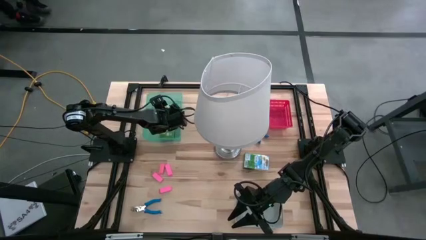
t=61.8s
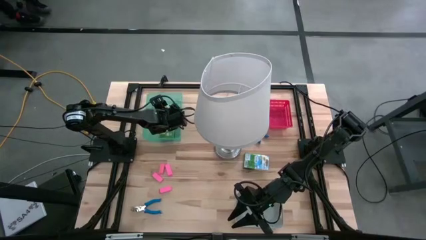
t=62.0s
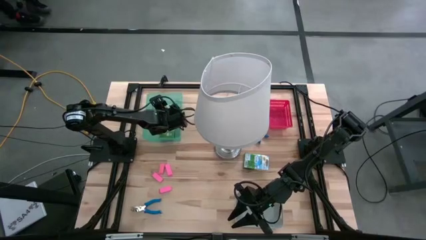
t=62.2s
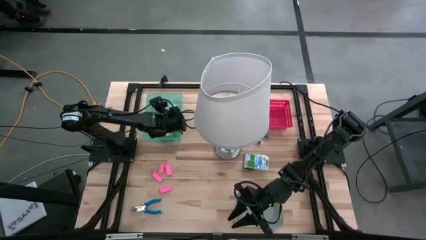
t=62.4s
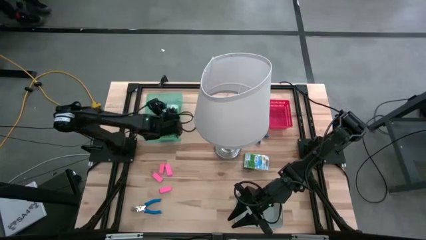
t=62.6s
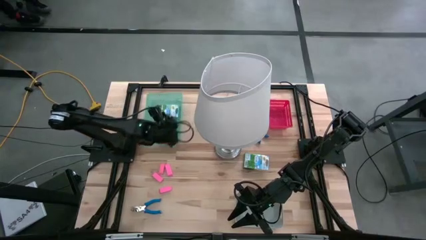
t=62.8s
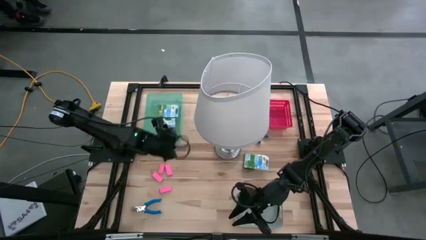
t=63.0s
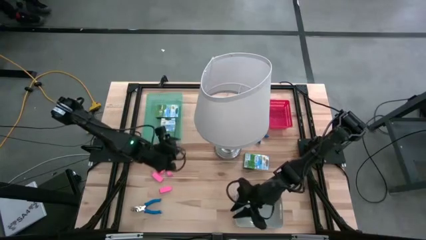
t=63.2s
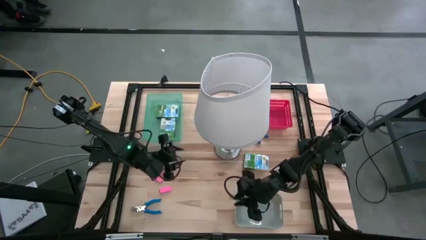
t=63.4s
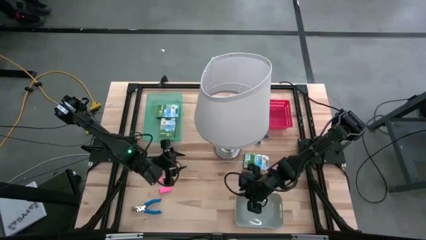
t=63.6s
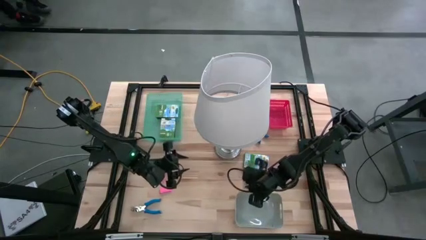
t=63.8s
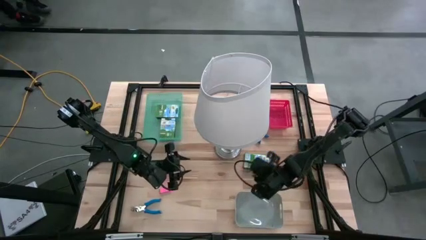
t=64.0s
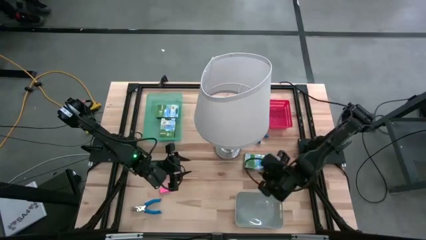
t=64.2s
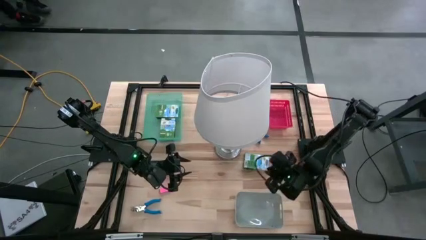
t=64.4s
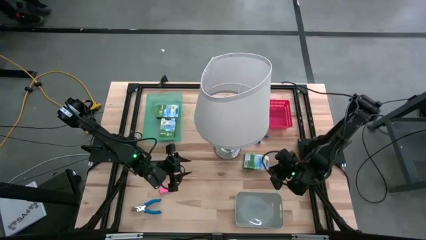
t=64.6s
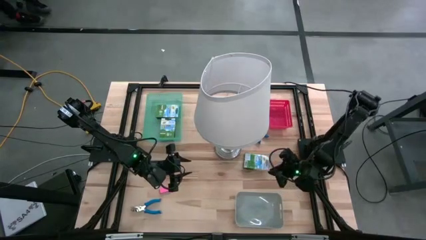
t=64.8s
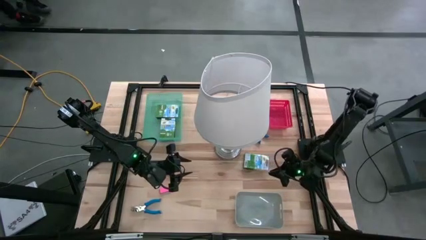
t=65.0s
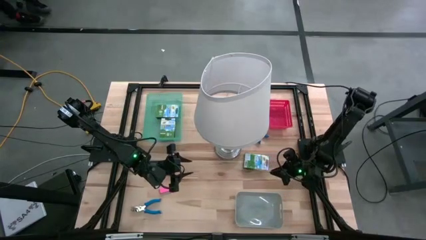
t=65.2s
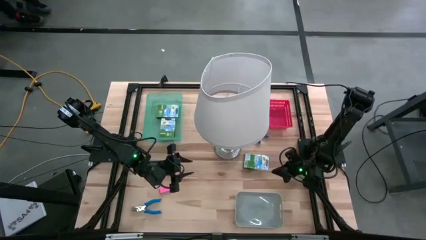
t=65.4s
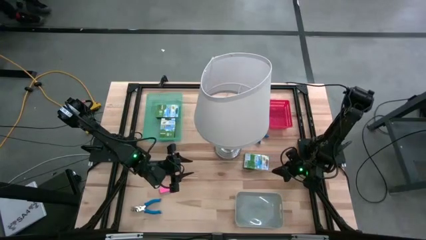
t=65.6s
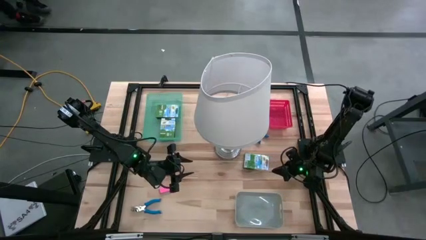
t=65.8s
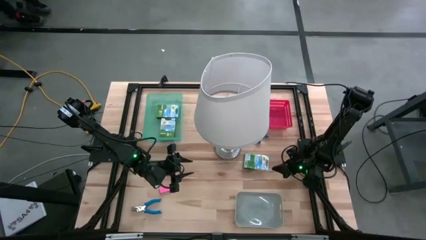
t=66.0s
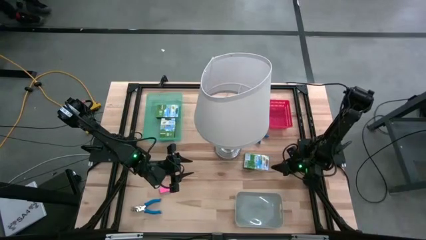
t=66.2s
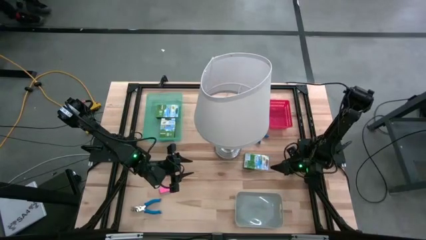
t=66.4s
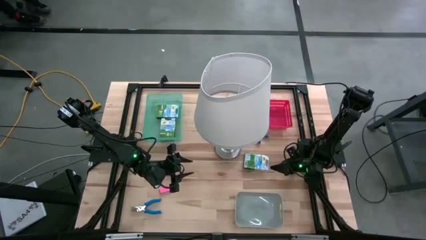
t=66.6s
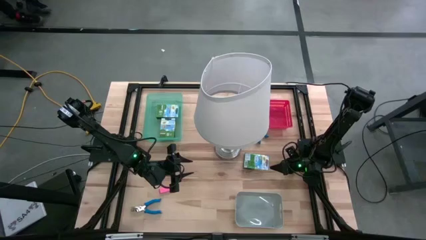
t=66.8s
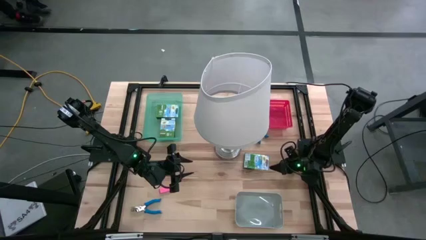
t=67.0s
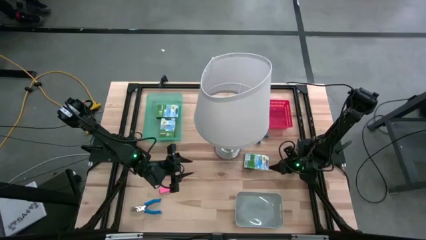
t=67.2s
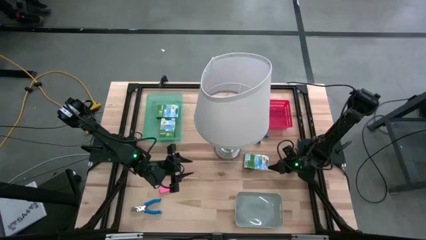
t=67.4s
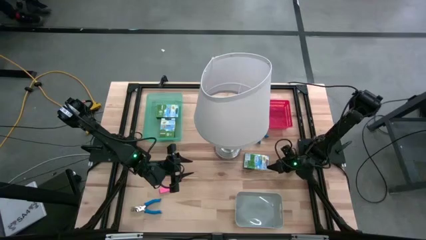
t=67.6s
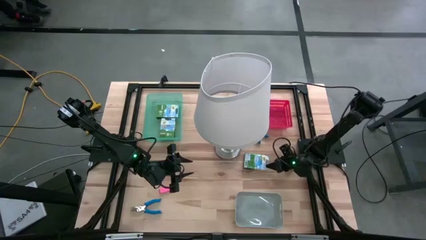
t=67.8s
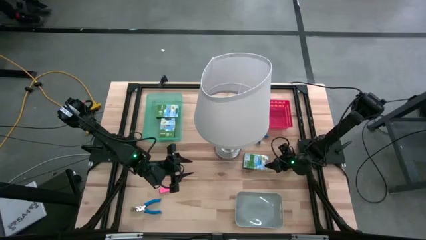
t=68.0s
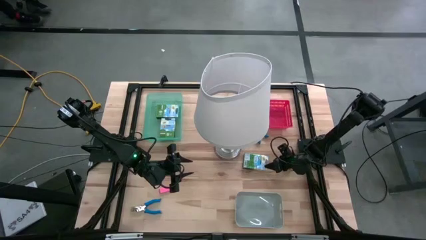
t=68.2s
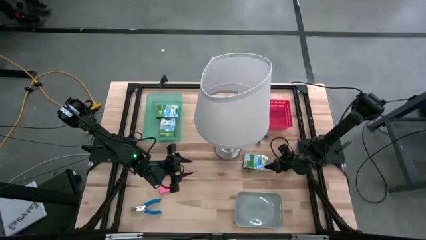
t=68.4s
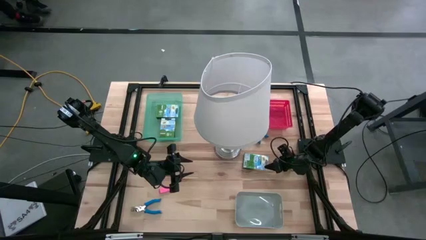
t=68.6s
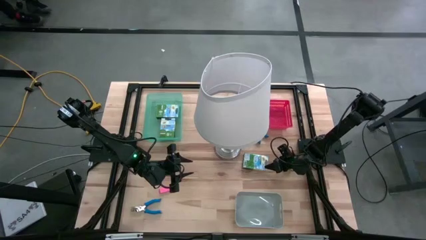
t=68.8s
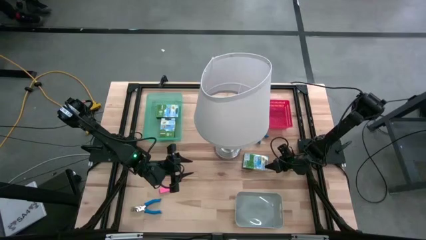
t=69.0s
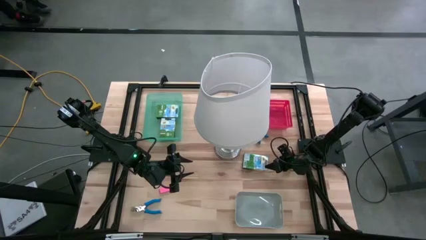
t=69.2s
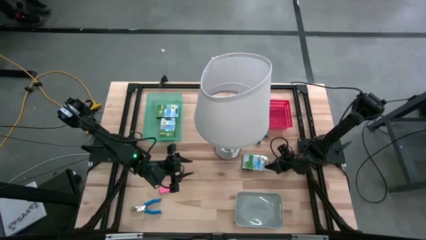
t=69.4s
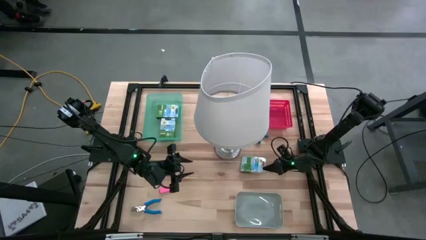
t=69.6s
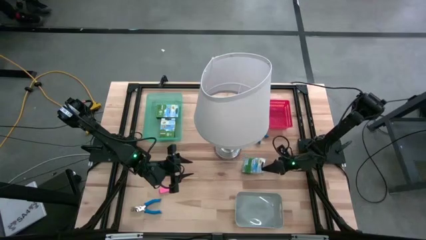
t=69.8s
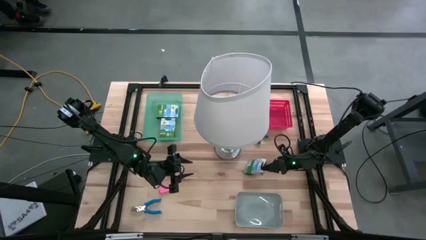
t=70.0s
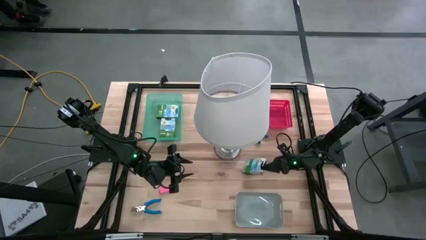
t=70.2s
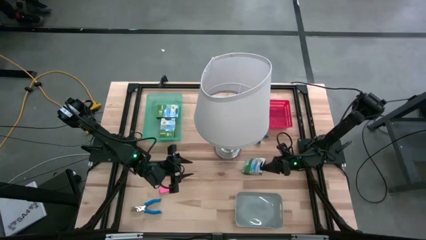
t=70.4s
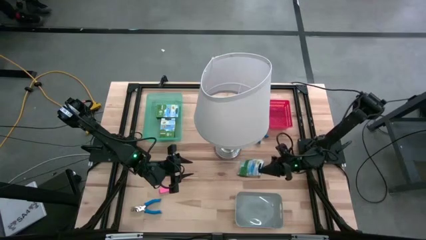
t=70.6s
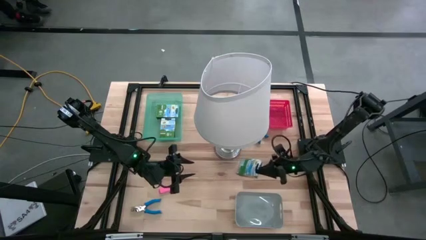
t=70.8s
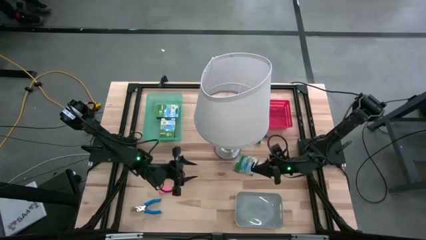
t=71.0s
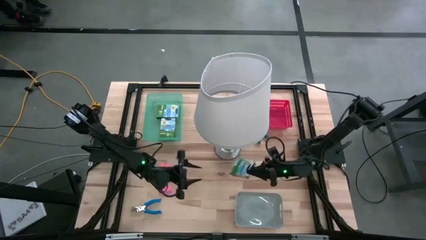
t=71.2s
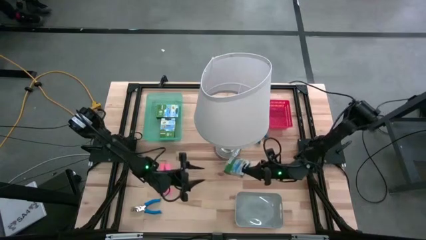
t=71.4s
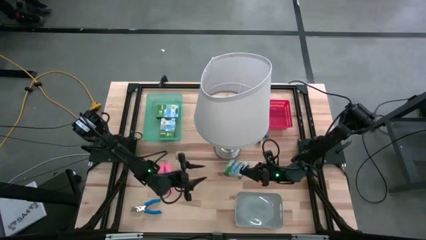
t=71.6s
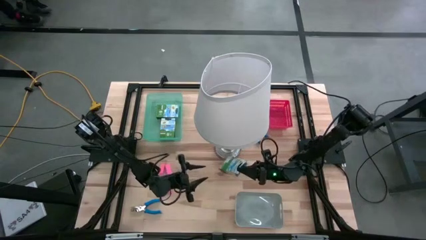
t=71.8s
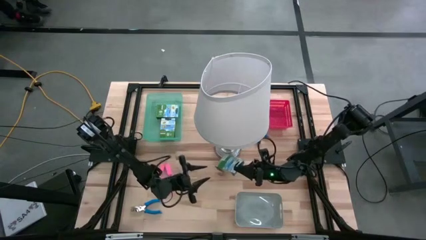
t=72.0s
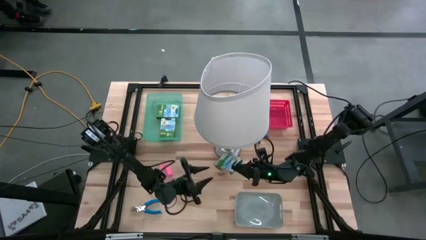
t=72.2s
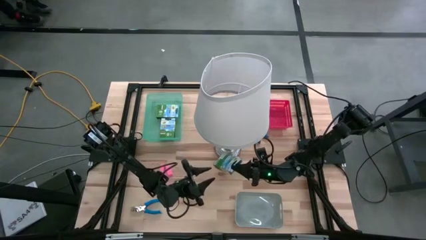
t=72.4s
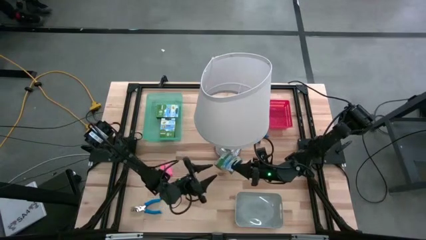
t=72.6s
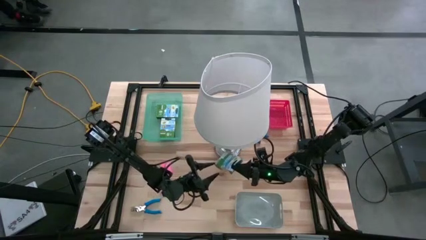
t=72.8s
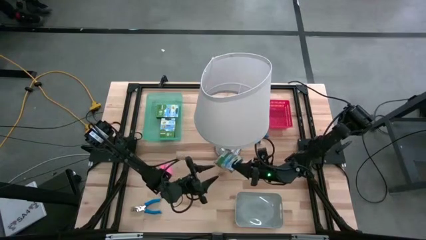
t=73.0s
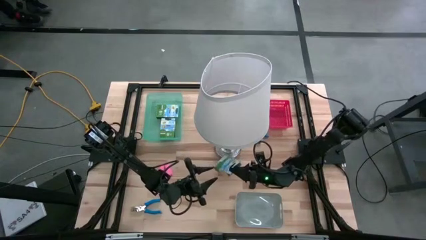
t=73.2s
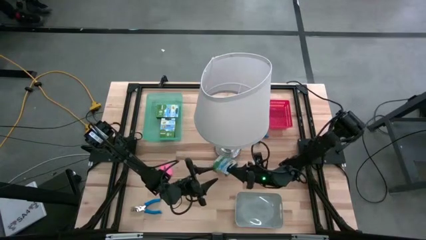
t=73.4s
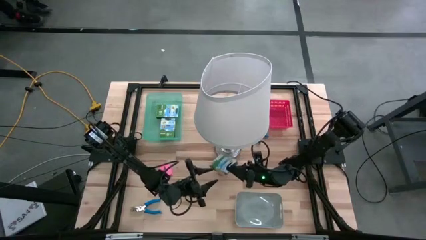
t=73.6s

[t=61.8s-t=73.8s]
Task: Pick & Place School Supplies
Put the yellow crayon box into the green bin

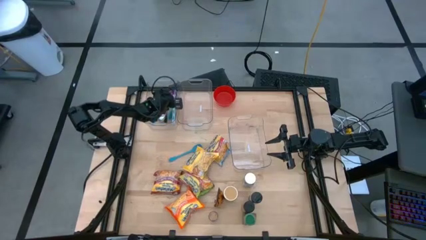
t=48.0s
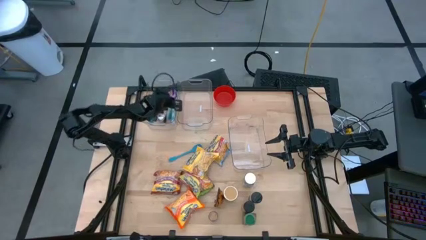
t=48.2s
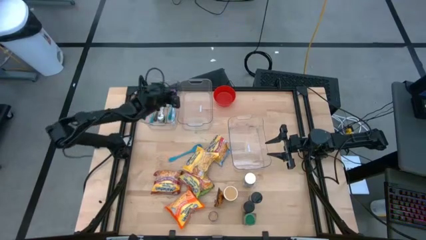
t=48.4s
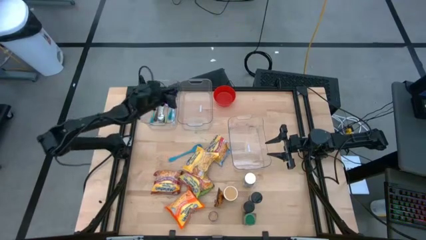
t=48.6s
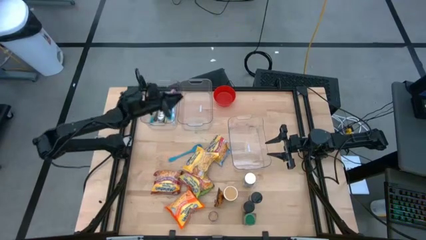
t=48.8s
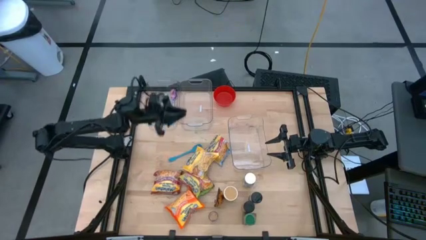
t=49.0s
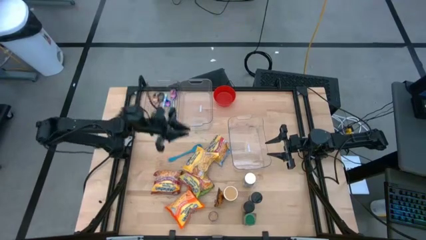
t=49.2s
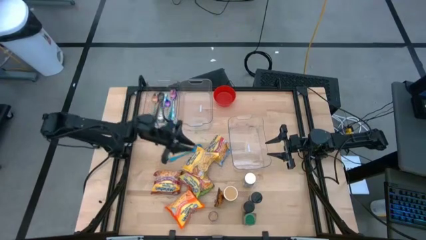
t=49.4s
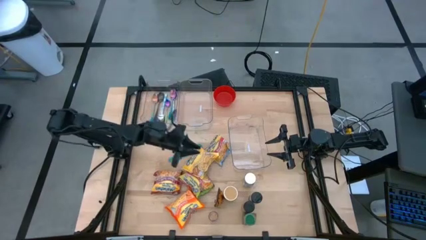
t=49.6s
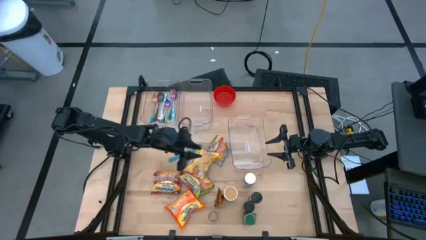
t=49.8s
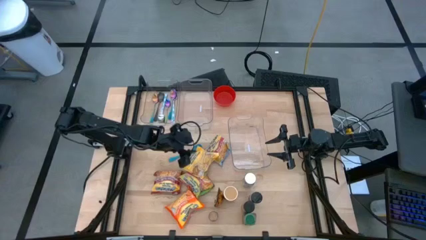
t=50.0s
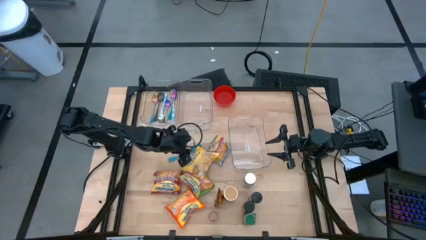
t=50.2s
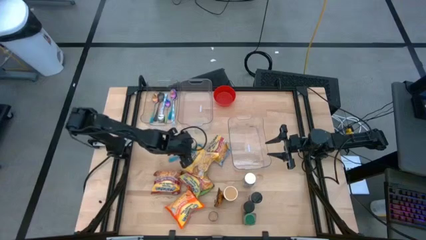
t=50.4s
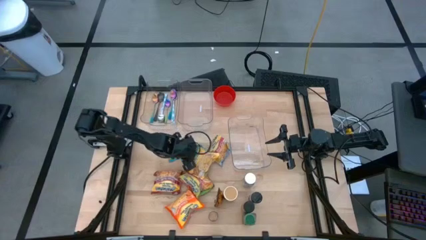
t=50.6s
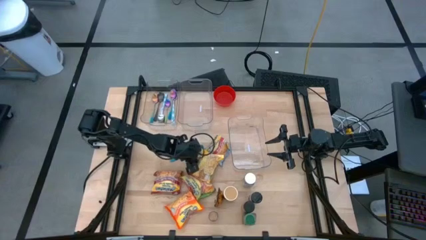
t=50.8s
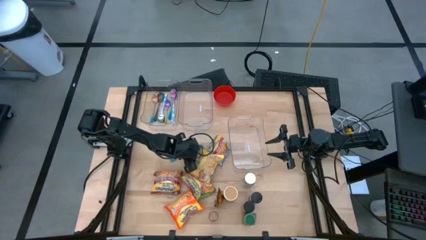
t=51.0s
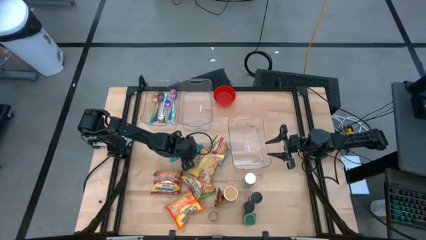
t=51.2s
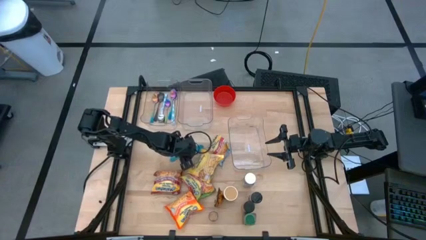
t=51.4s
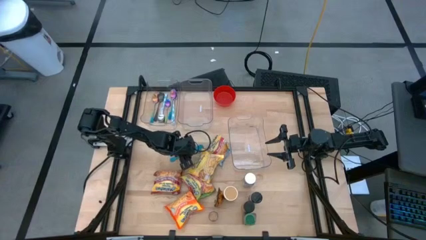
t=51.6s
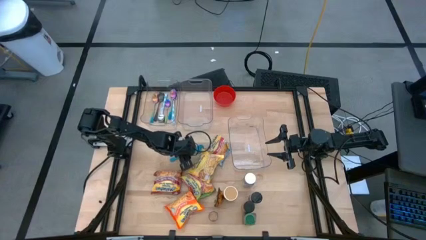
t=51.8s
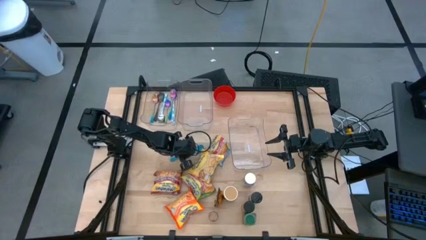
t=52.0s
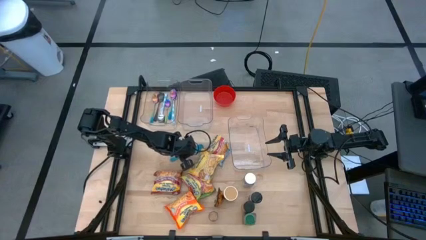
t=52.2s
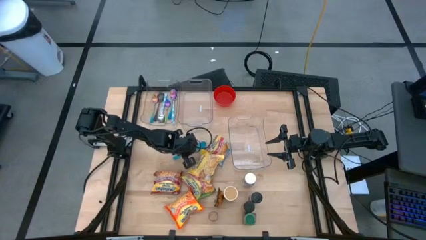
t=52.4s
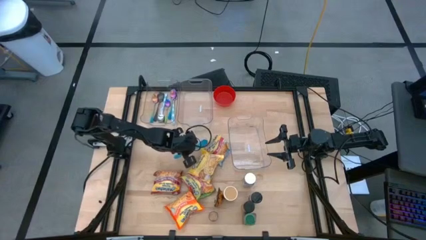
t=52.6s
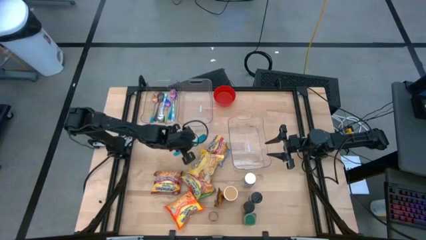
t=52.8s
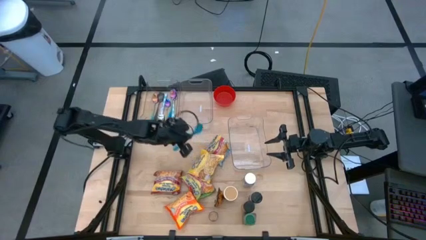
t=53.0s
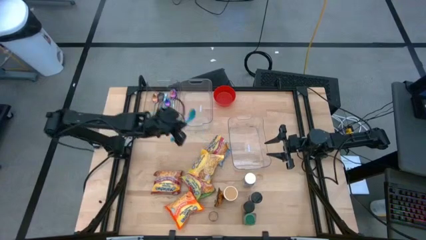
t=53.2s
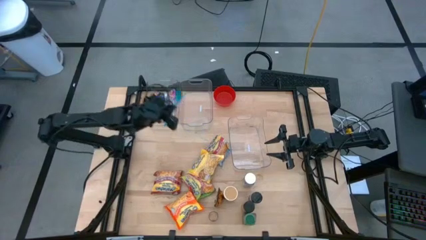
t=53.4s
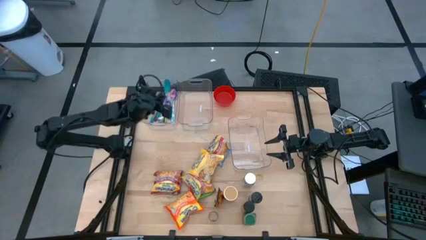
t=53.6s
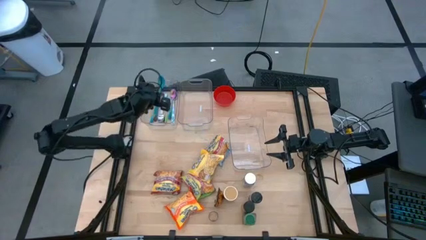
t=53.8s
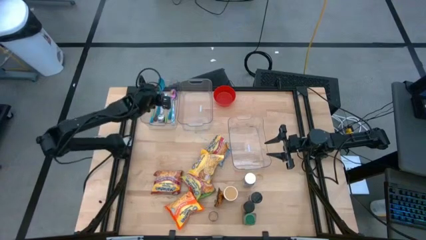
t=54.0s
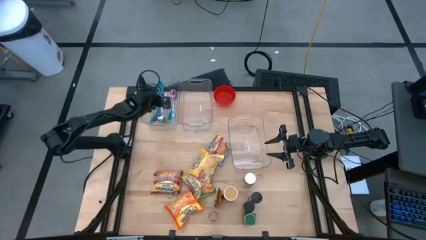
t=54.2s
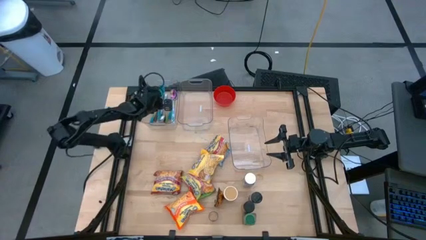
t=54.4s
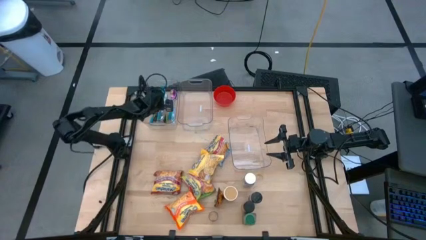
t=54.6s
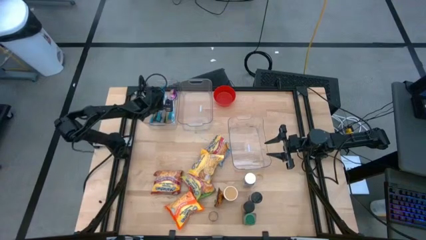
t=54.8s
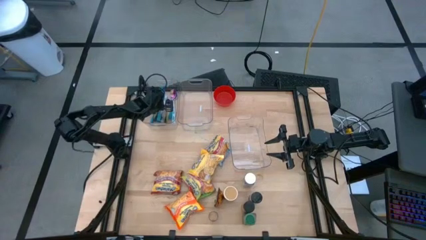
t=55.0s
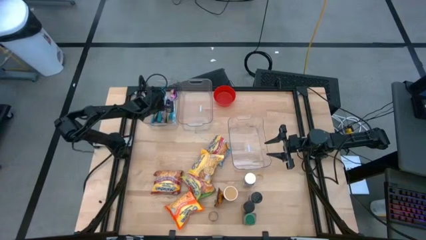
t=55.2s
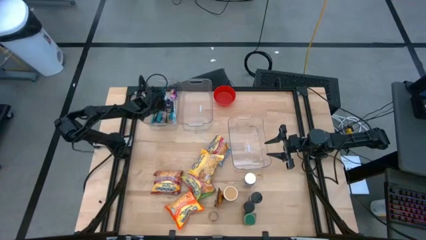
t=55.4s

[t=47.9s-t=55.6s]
Task: Pick & Place Food Item
Put the blue baby spoon into the top left transparent bin
